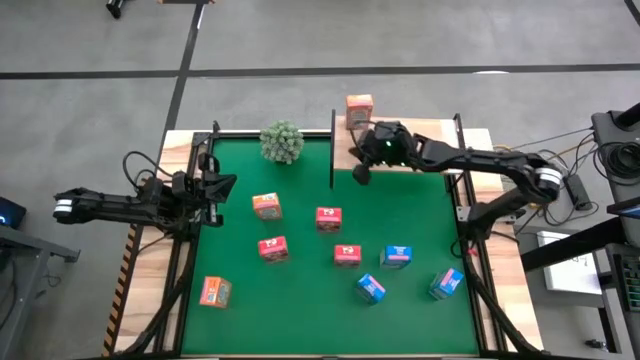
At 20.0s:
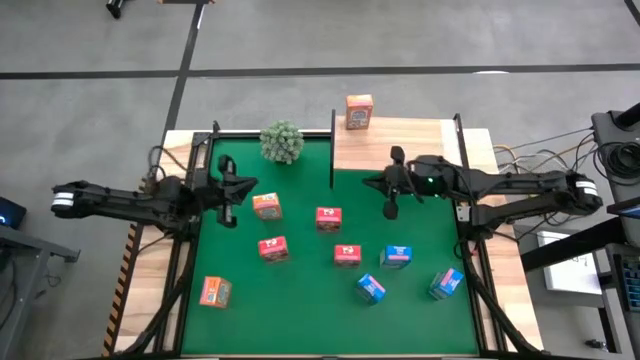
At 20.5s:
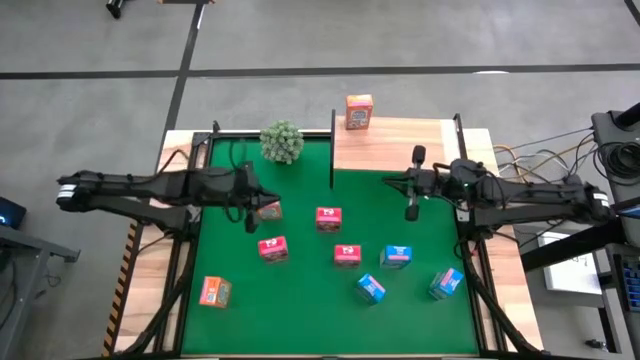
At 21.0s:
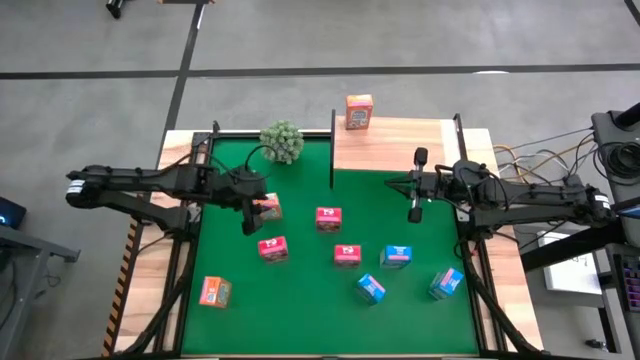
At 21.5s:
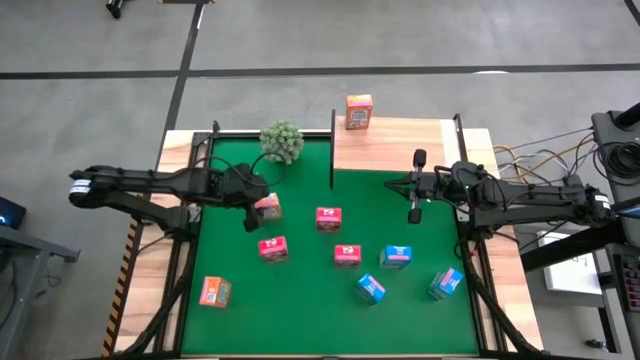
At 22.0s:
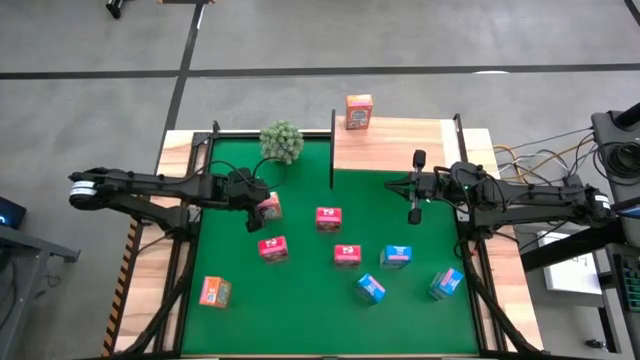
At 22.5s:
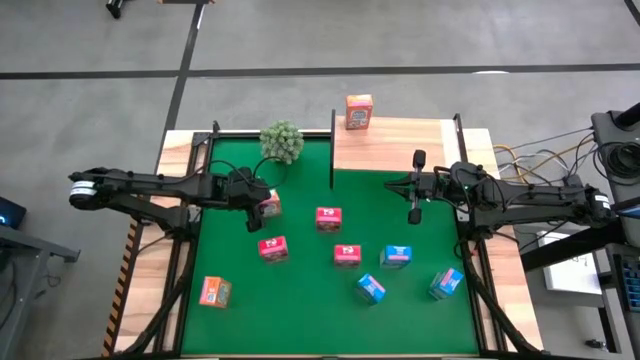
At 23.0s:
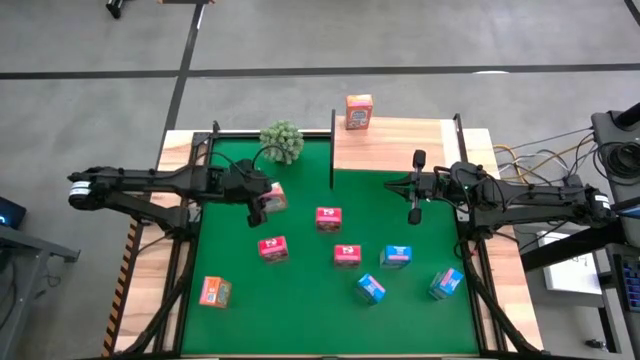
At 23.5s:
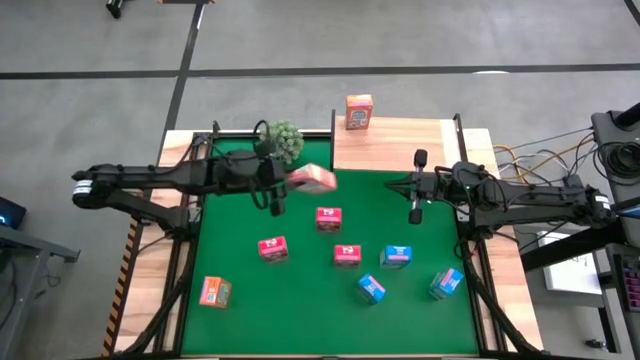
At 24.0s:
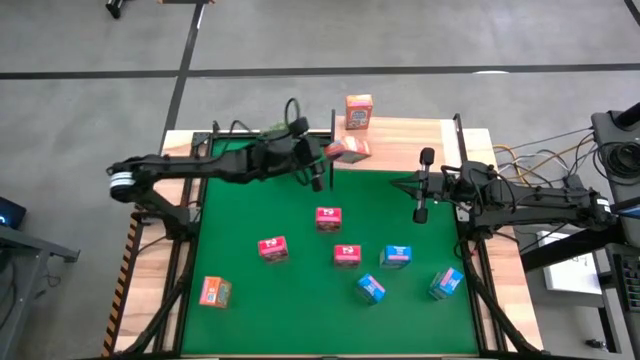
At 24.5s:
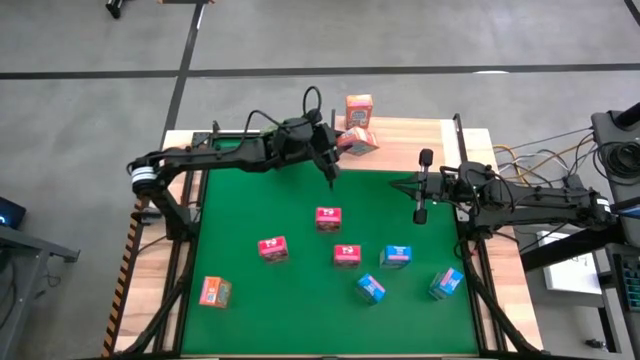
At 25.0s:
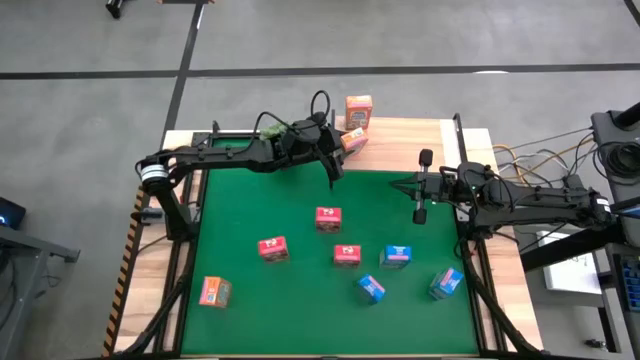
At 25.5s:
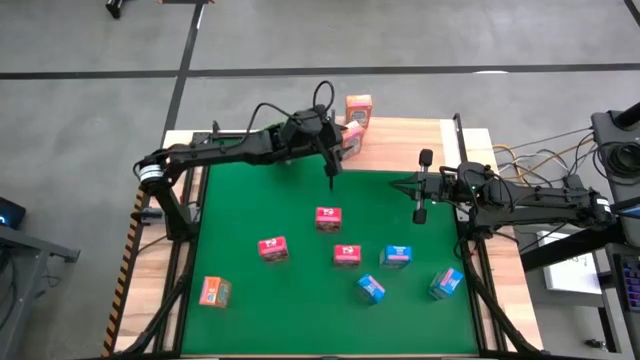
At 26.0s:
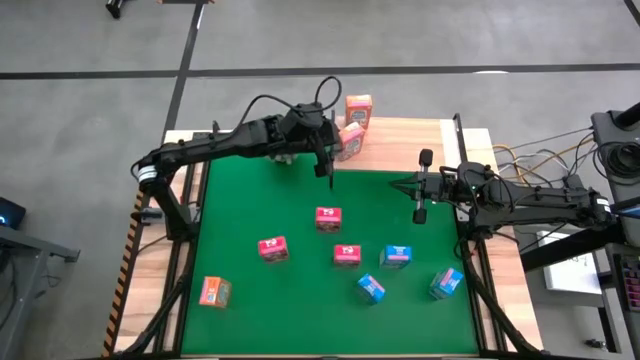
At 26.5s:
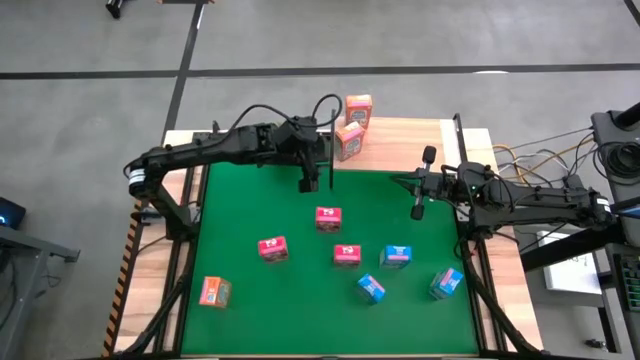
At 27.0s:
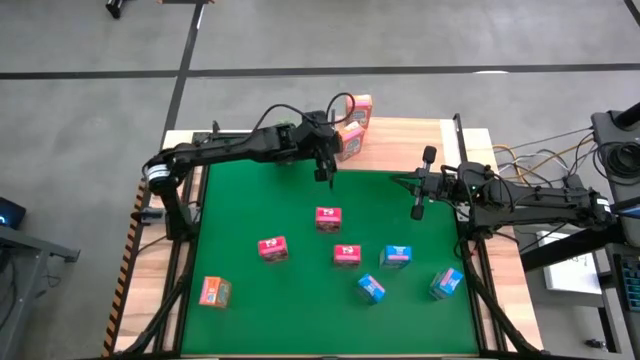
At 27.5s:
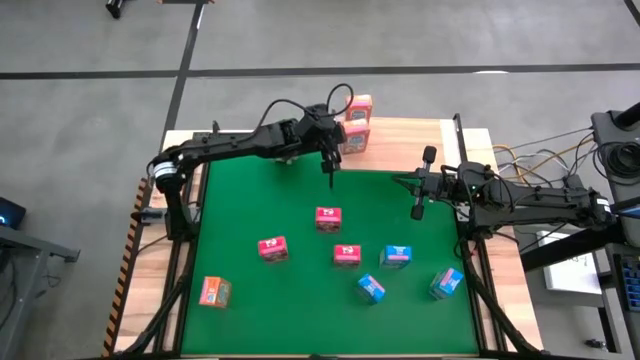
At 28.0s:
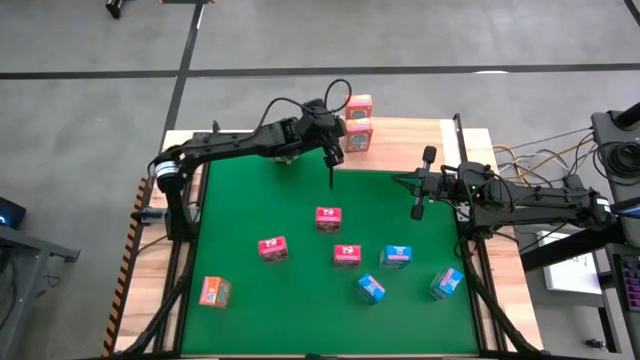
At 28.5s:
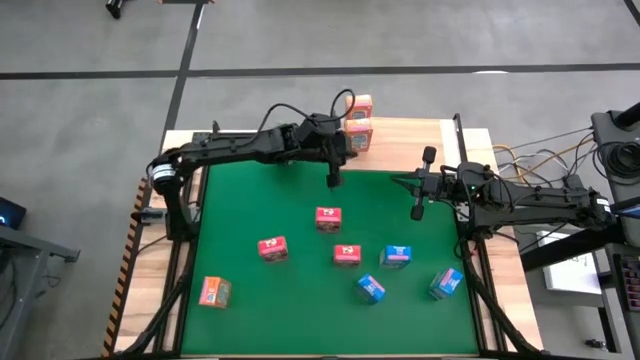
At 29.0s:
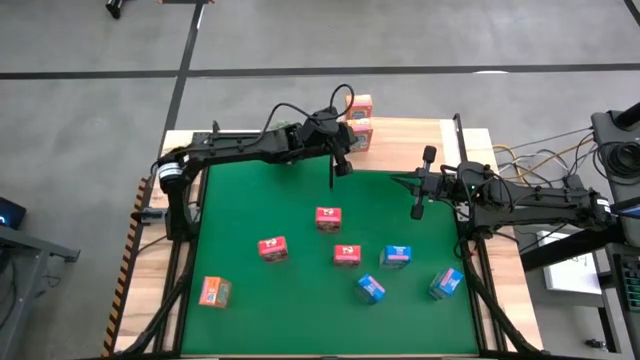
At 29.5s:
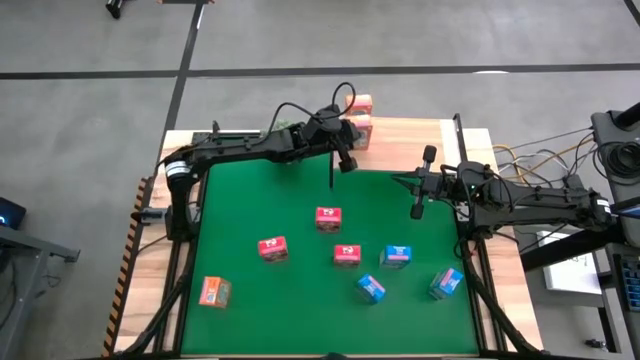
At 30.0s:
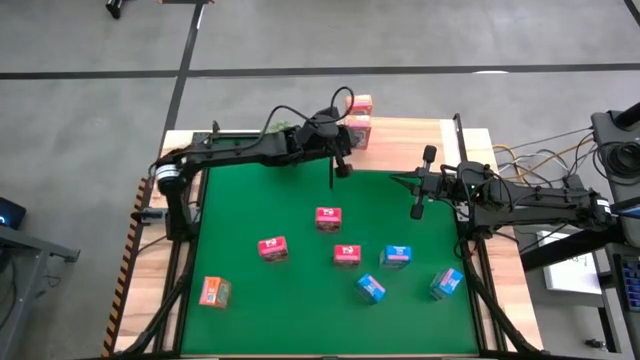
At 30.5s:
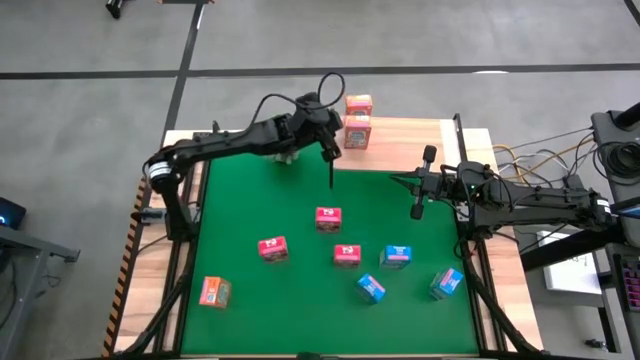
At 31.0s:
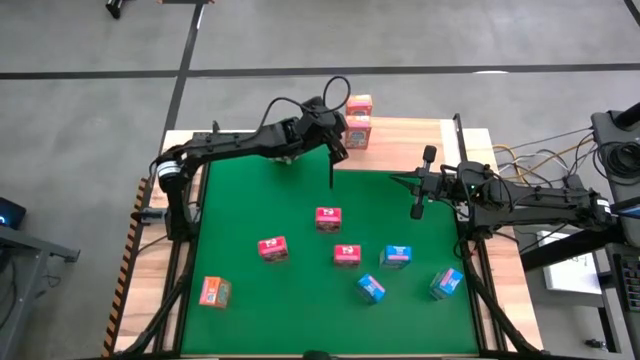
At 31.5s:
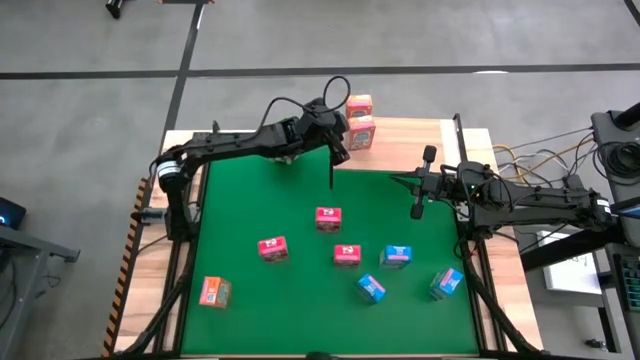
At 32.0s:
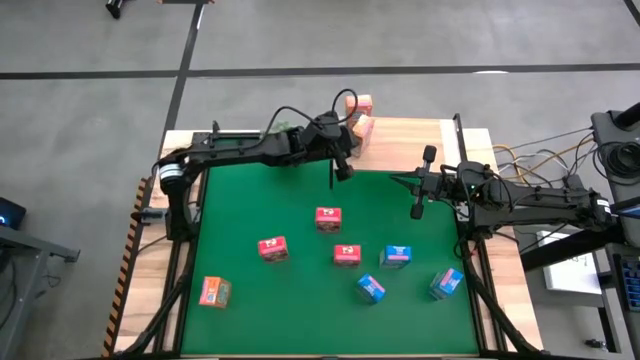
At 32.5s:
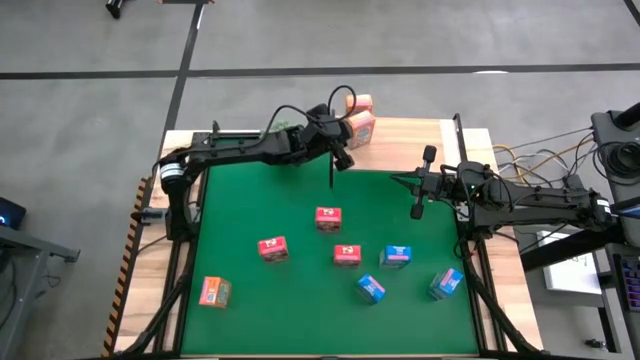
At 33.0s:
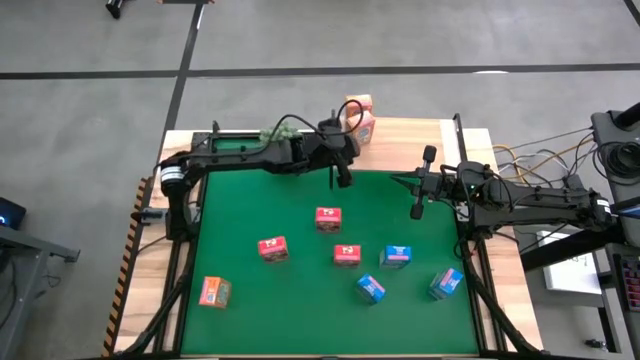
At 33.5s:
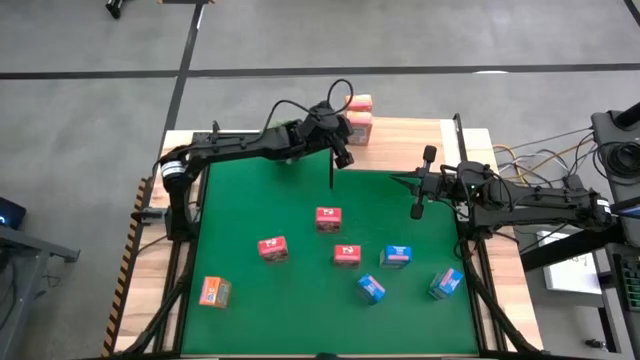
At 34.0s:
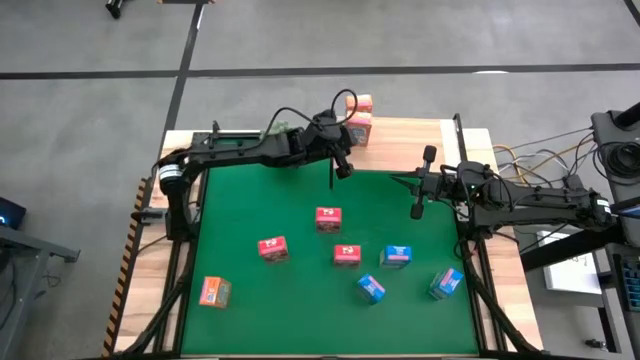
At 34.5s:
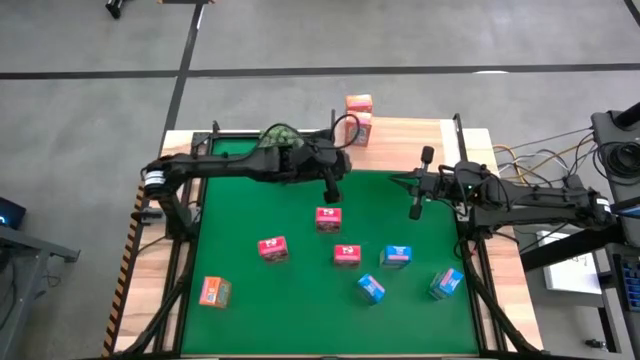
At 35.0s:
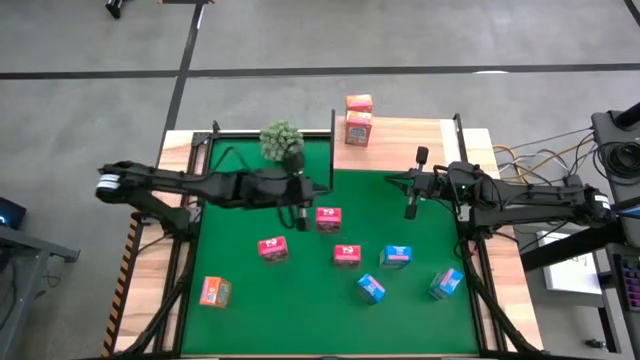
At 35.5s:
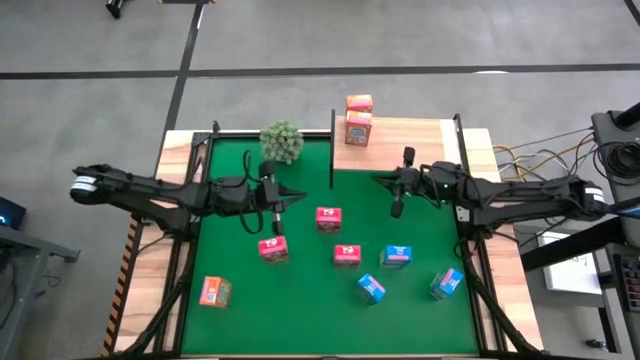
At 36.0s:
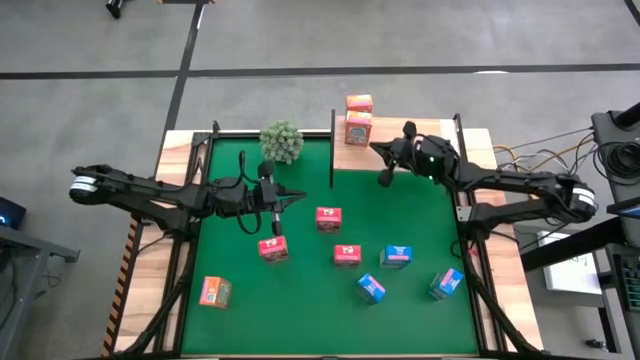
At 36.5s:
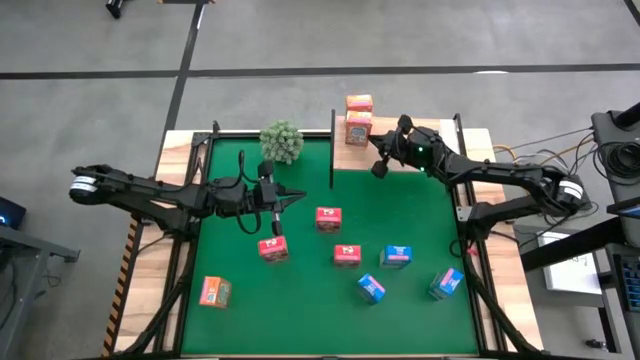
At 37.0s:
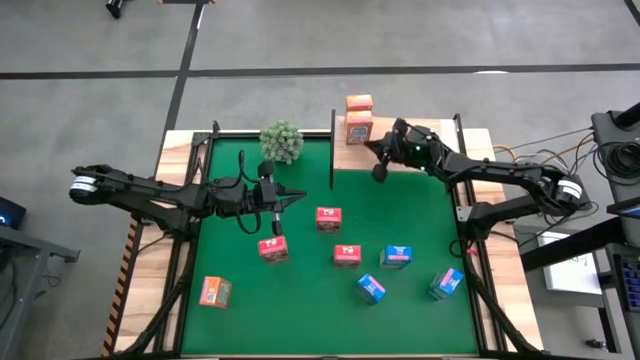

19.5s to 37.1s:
Task: Stack cereal on shelf
Put the top orange cereal box on the shelf

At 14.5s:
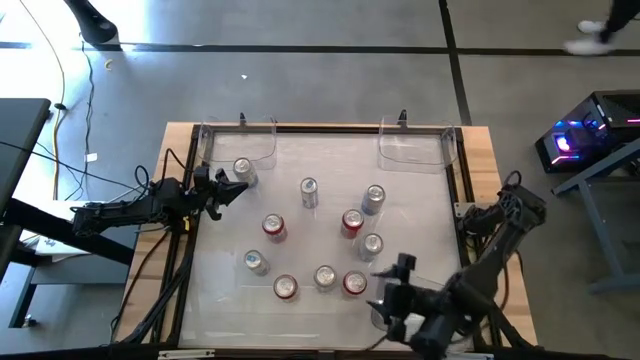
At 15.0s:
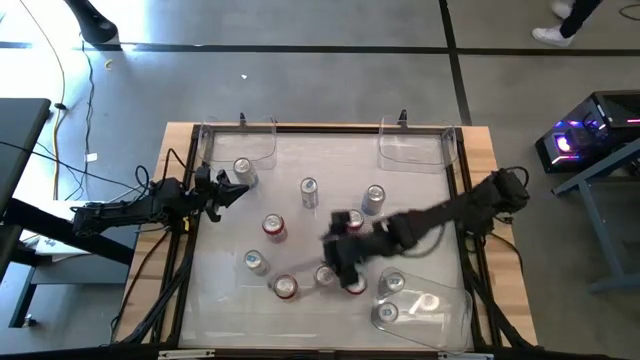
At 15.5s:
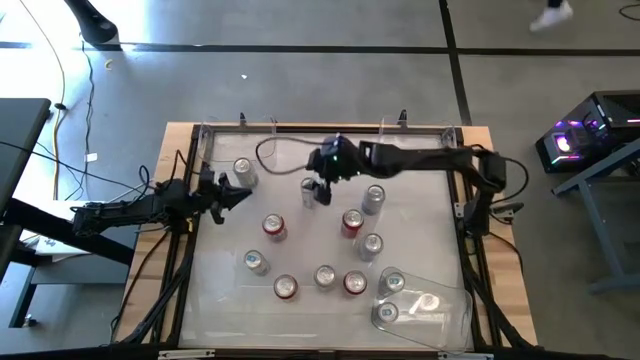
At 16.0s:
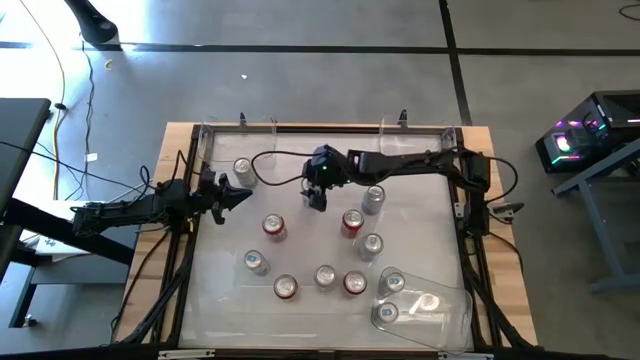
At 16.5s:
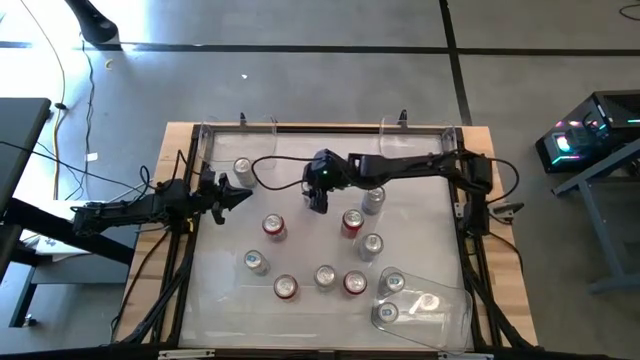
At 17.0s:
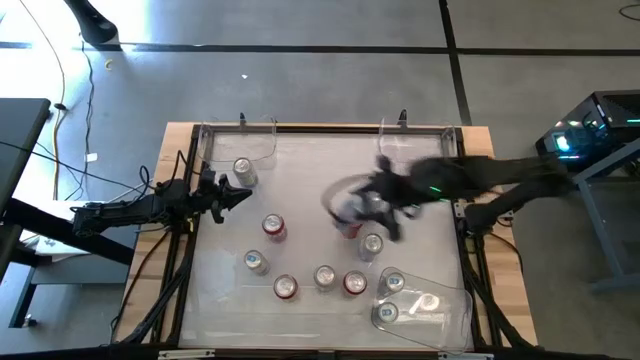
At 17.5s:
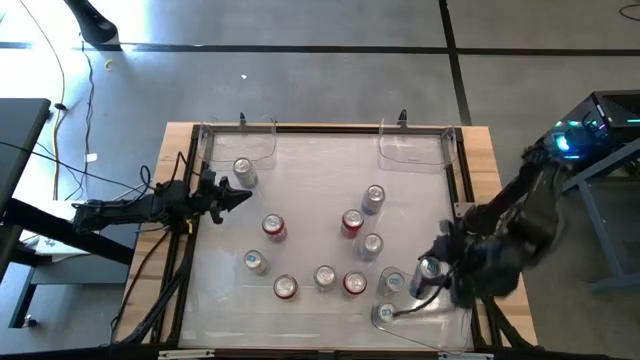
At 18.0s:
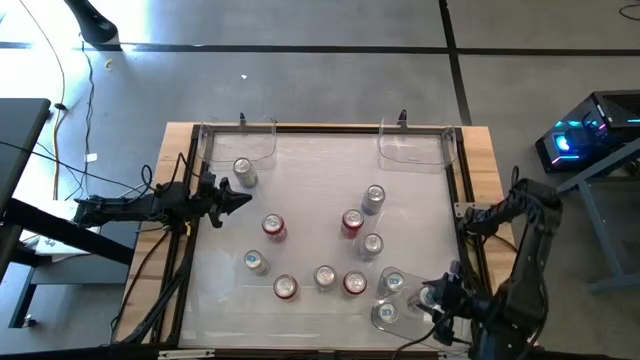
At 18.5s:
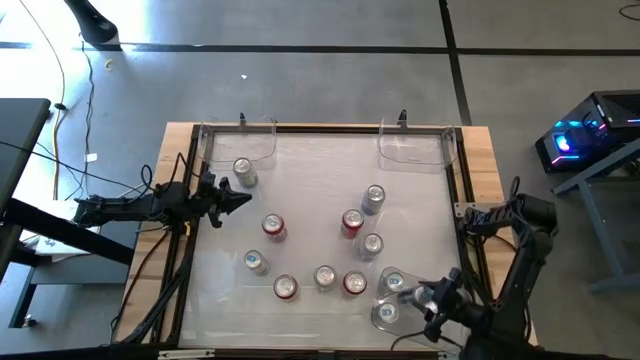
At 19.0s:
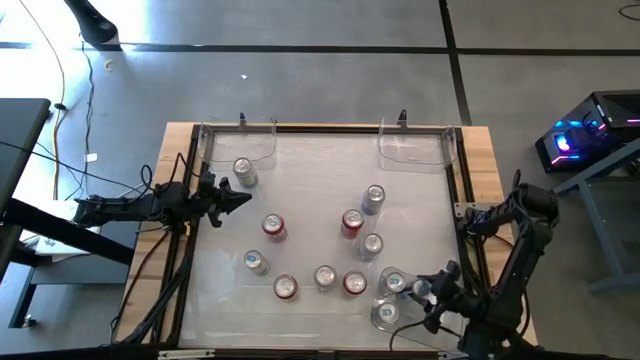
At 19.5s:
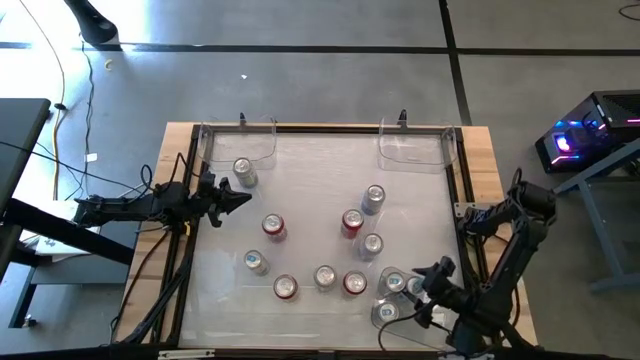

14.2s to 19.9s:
Task: Sort soda cans
Put the blue soda can into the bottom transparent bin
